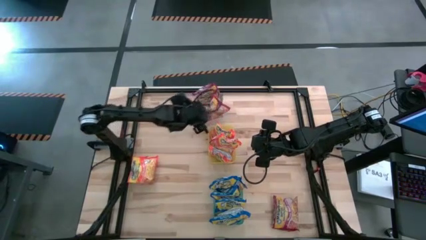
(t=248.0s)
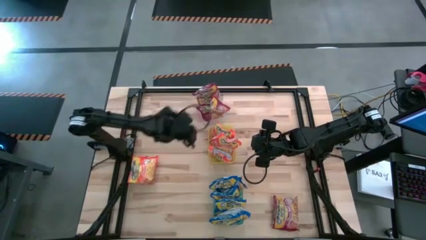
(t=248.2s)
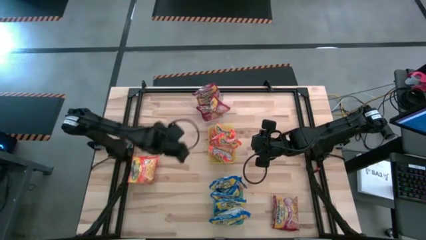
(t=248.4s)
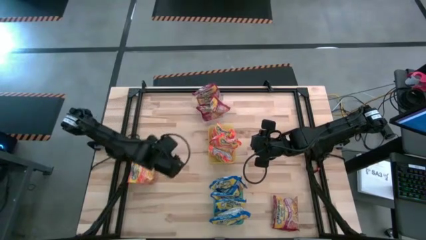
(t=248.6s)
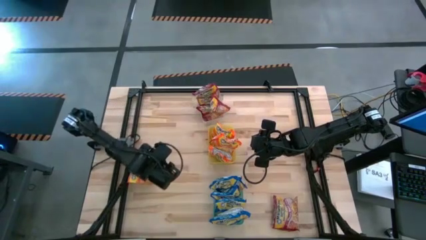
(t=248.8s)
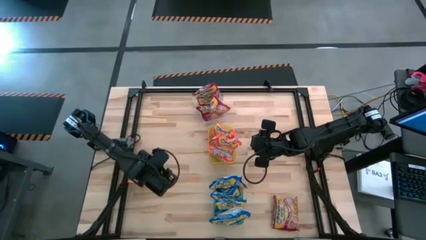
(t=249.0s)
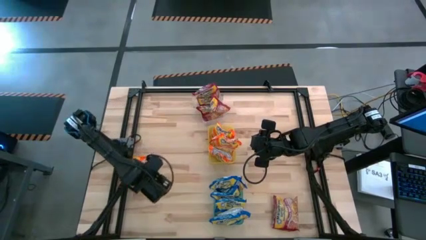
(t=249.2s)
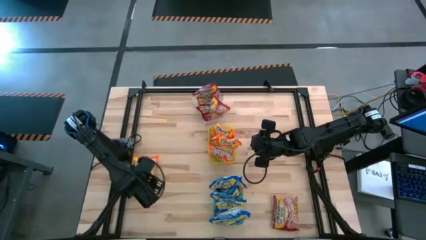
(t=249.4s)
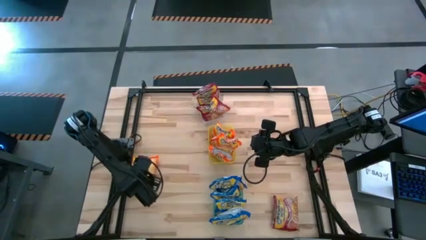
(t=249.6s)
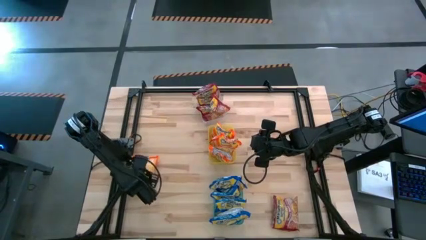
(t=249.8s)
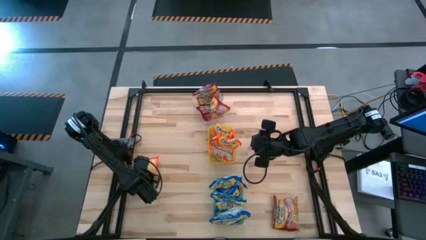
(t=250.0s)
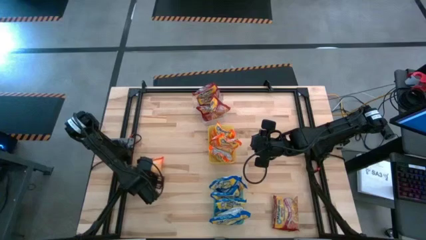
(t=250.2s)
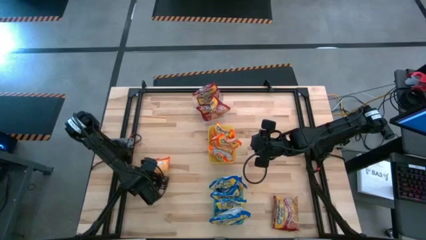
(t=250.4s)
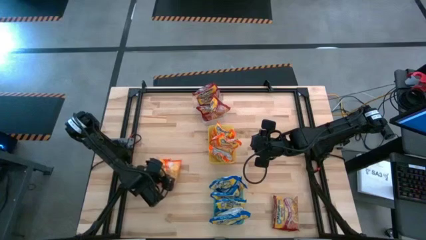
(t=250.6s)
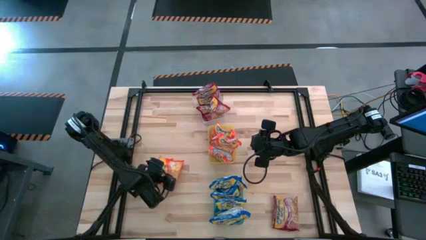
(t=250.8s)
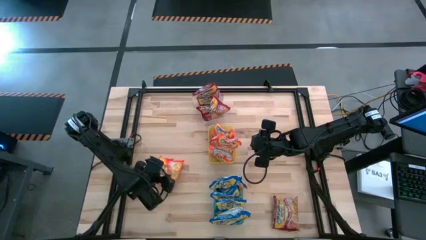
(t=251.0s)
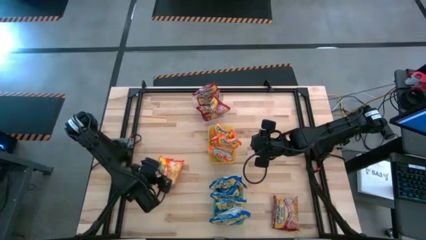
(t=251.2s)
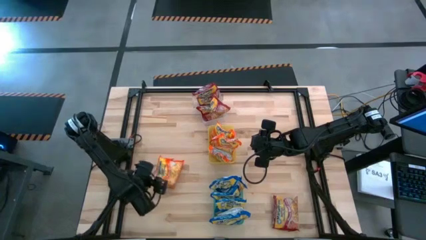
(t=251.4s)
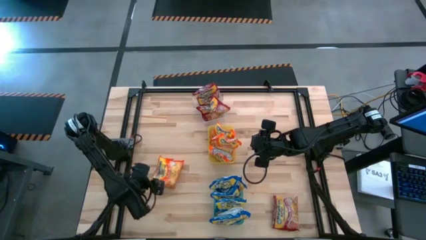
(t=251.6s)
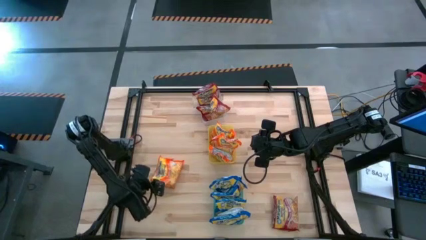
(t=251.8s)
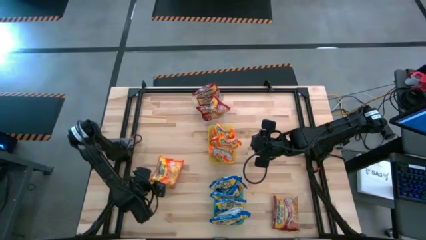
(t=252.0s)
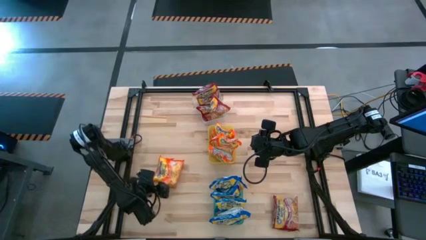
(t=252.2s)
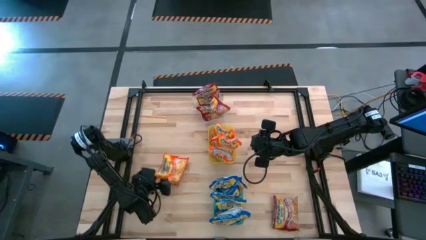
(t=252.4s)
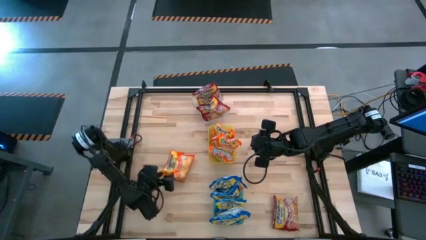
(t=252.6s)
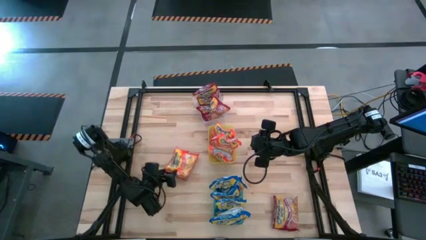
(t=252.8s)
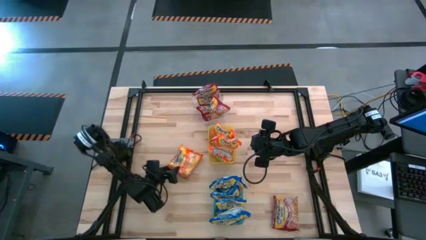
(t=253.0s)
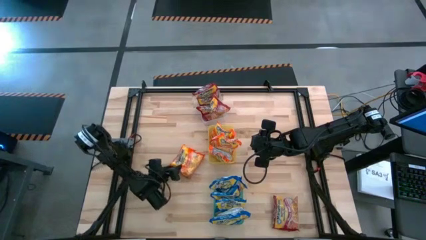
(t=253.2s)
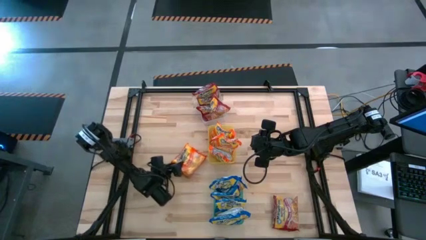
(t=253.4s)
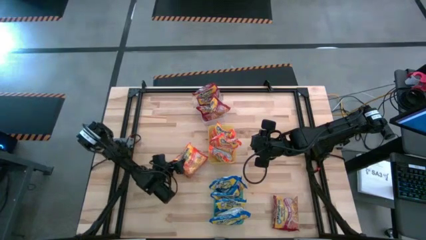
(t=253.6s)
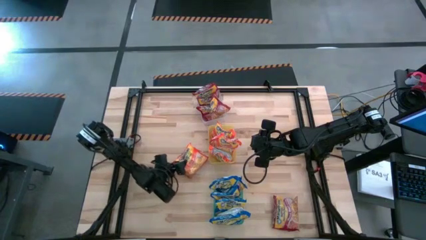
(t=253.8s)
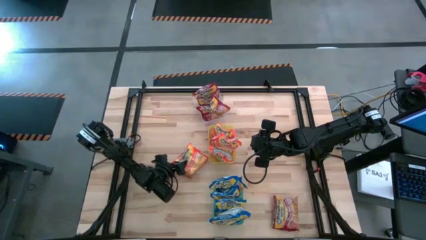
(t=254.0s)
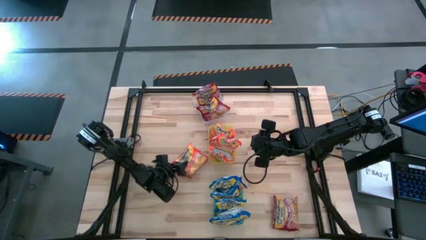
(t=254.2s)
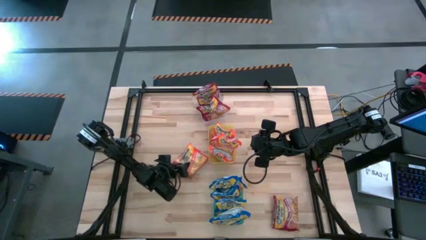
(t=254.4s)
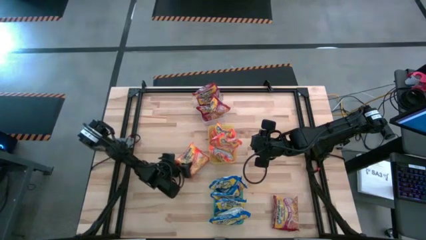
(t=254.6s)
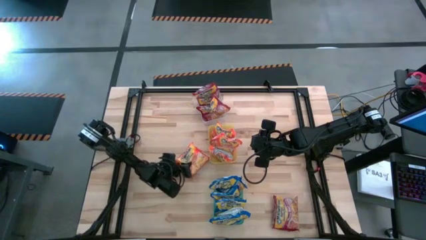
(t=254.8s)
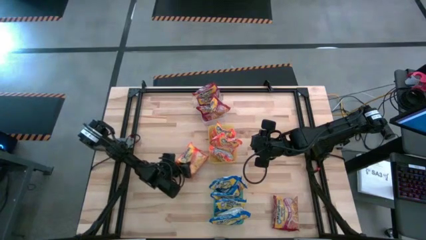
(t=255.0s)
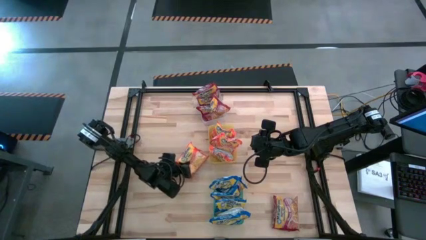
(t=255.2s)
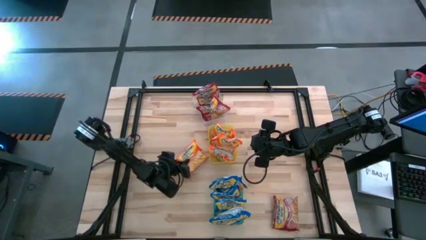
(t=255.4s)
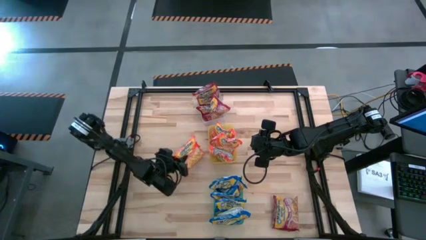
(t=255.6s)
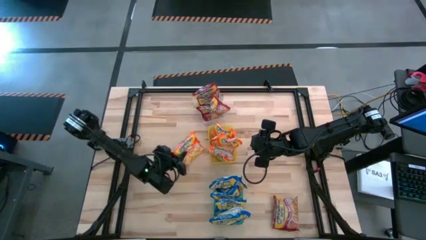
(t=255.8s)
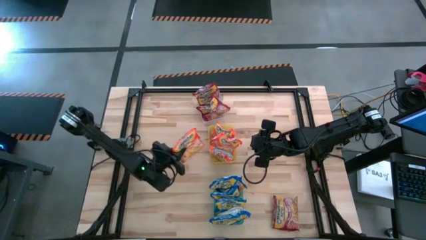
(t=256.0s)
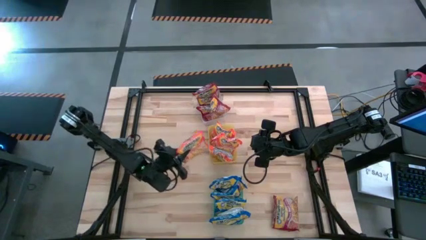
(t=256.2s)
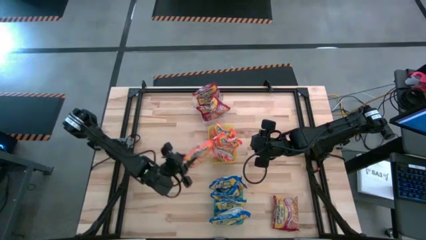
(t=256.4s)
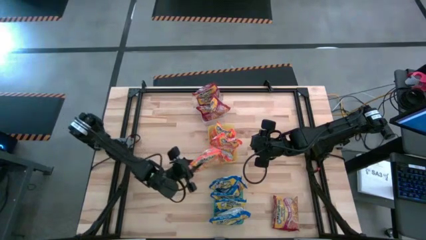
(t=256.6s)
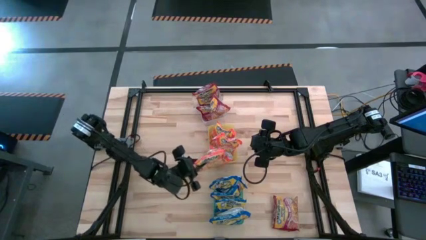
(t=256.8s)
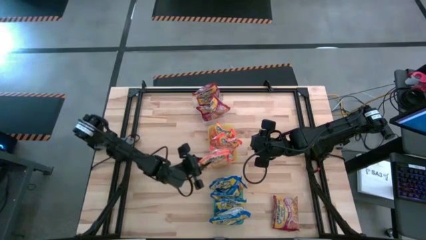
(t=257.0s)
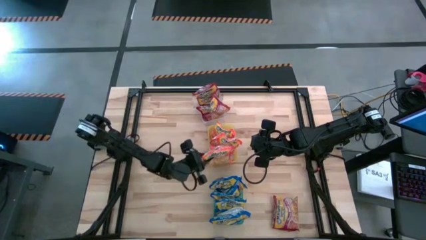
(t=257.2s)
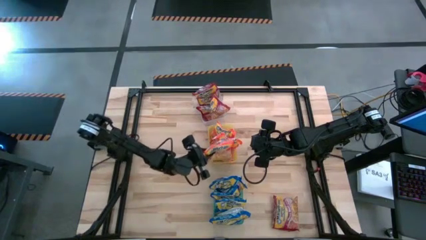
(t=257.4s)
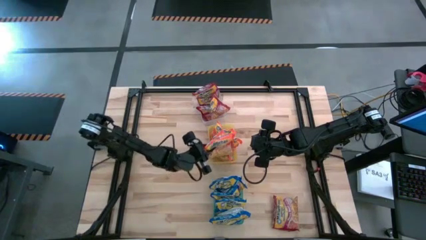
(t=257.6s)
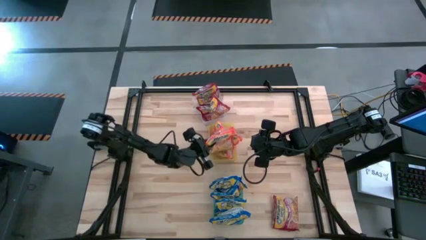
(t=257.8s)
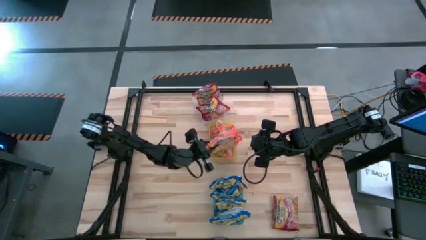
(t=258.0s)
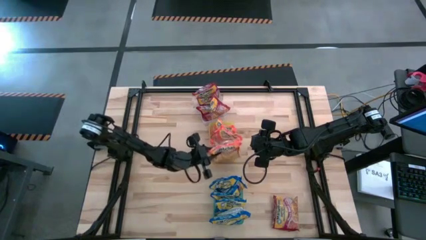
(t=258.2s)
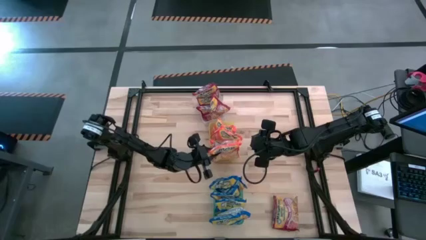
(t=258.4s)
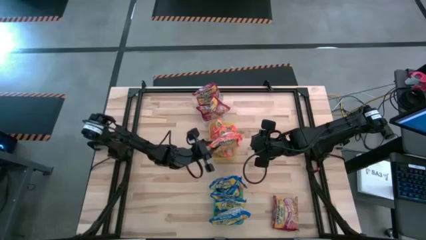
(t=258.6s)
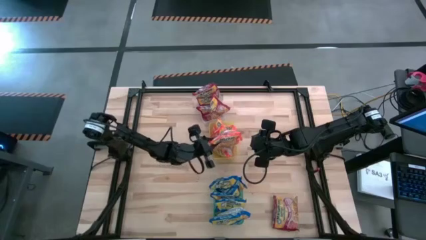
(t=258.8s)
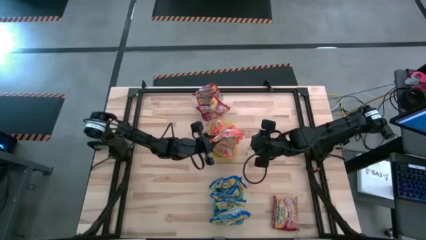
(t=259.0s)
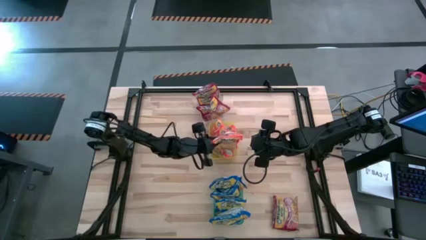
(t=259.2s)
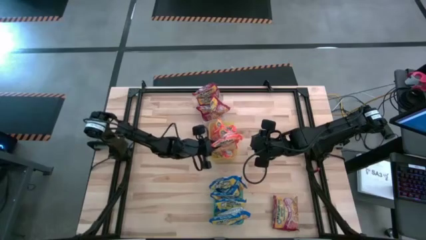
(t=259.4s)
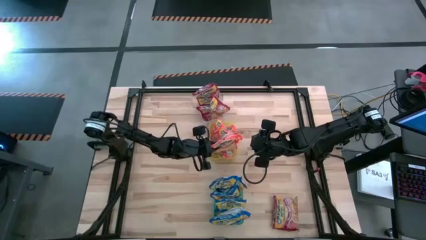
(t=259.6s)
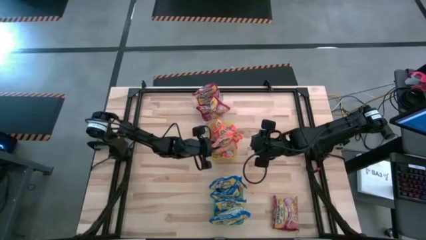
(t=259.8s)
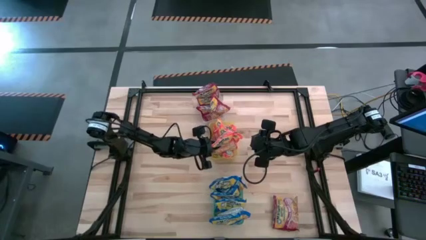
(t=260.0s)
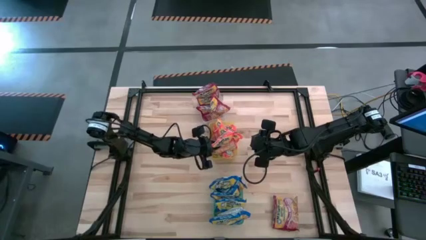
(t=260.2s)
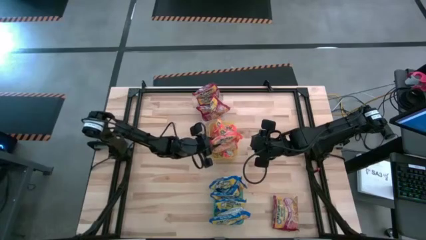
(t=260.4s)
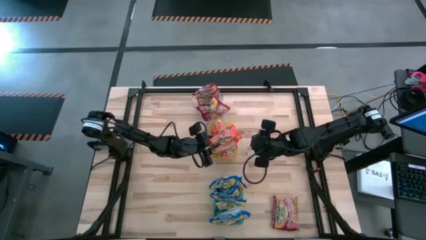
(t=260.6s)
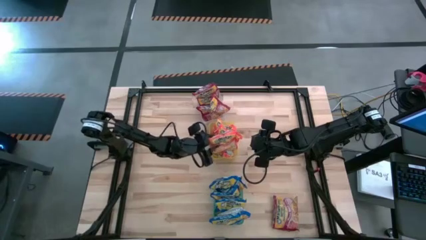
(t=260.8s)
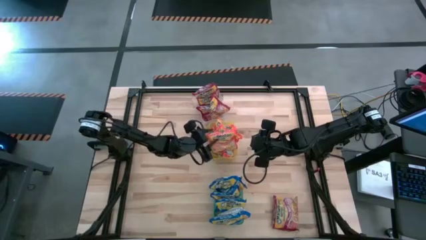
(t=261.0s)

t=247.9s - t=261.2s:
Task: Sort Maruchan noodles
Put the orange noodle pack into the yellow bin

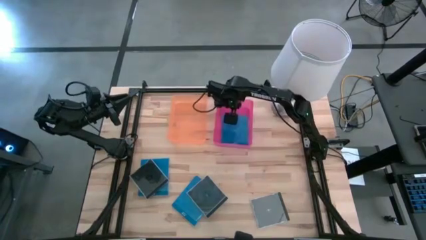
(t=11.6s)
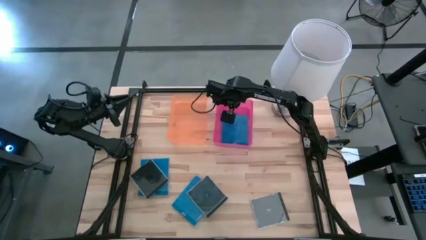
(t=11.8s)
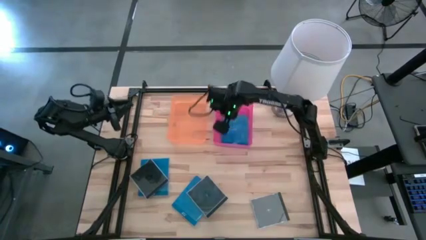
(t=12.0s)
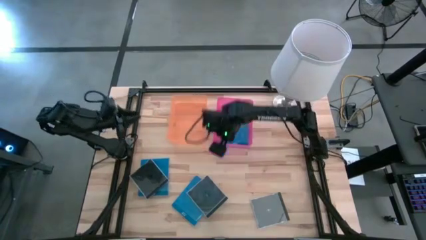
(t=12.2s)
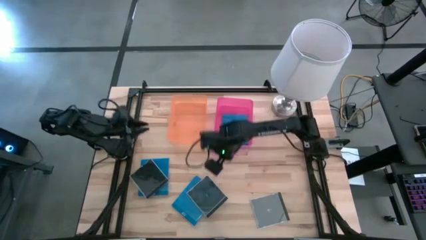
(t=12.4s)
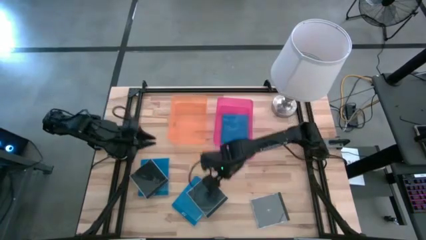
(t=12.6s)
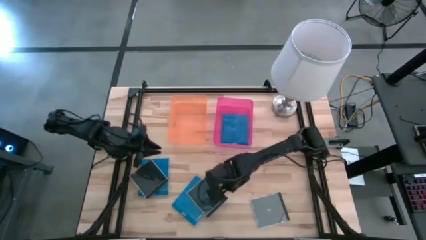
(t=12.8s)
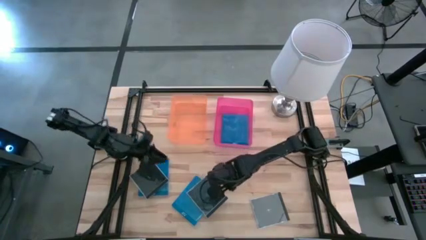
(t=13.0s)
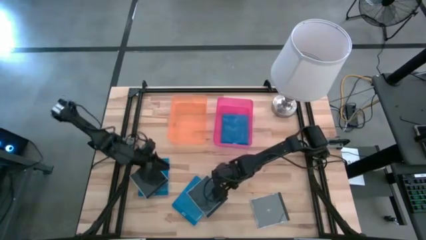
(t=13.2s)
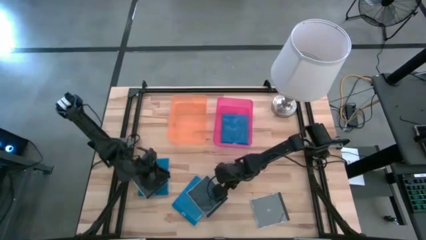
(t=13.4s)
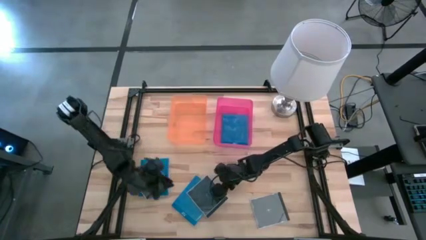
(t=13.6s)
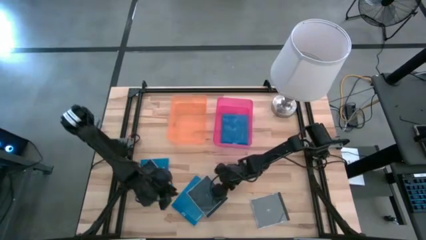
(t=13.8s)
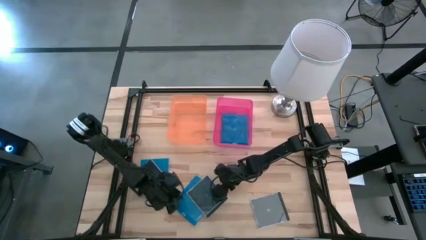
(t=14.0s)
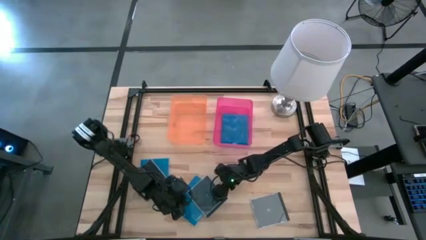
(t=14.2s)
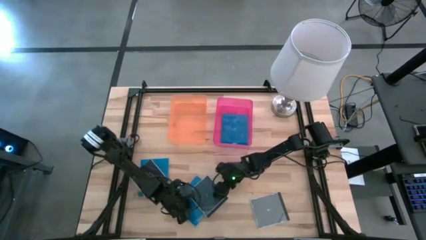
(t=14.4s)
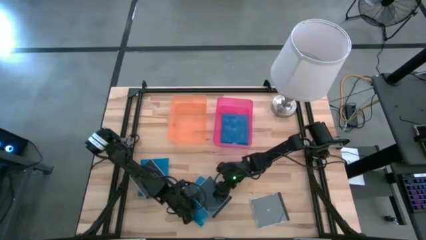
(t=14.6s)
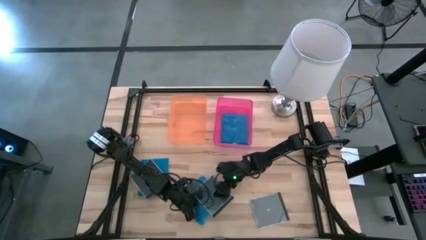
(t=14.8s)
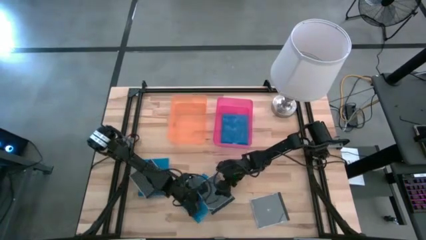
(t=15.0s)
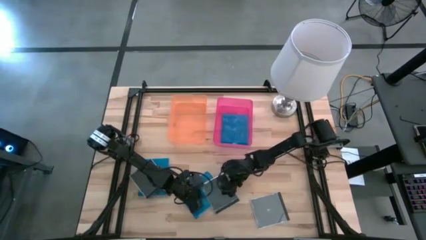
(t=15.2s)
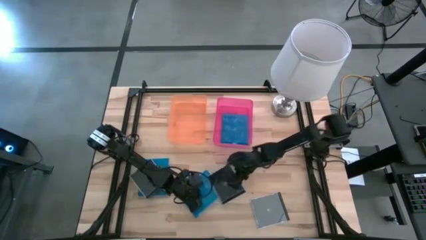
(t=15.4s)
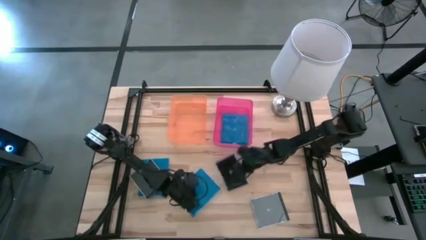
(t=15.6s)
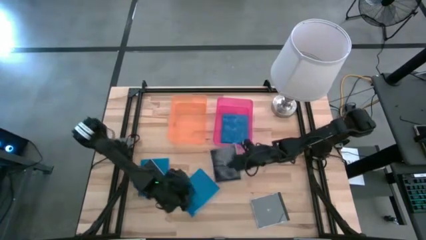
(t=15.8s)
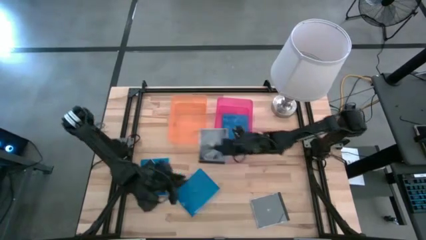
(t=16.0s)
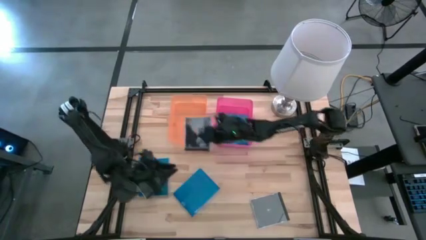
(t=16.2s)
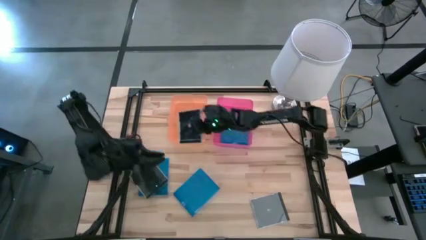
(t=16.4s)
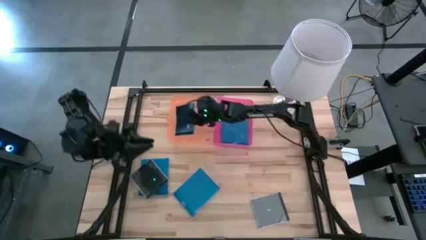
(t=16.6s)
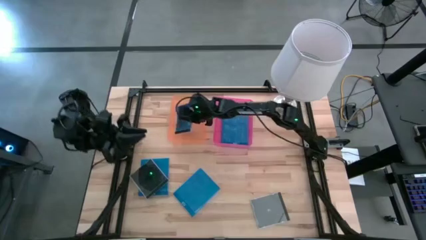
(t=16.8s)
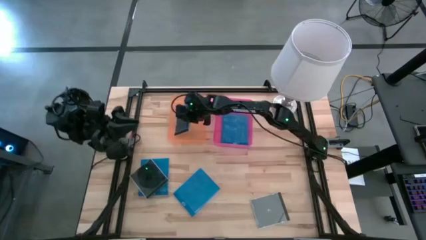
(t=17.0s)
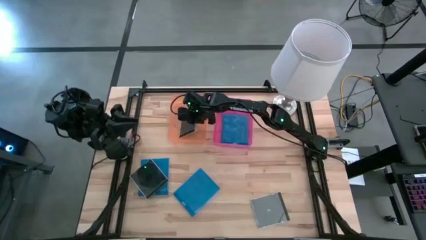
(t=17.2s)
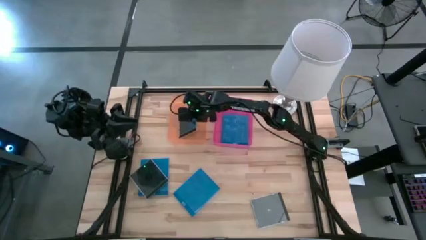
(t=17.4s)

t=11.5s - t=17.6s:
Task: Pick & place jewel cases by type
Put the middle black CD case into the orange bin
